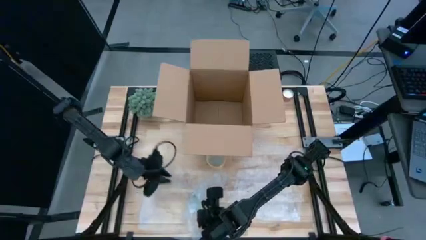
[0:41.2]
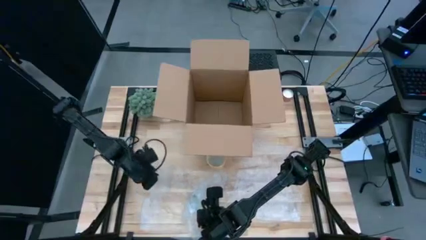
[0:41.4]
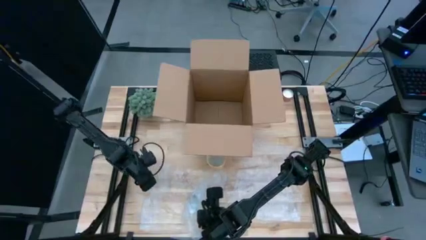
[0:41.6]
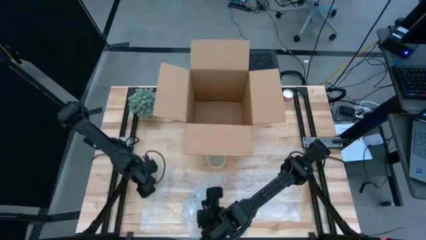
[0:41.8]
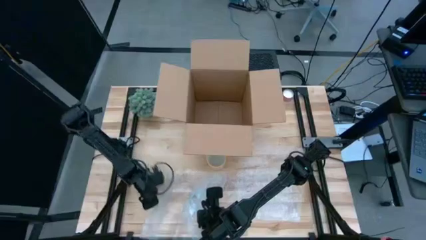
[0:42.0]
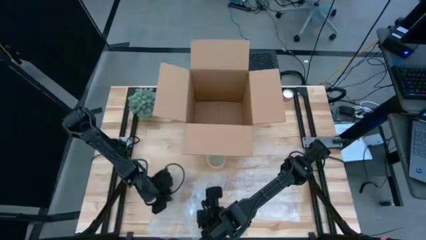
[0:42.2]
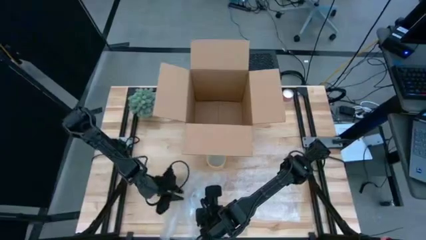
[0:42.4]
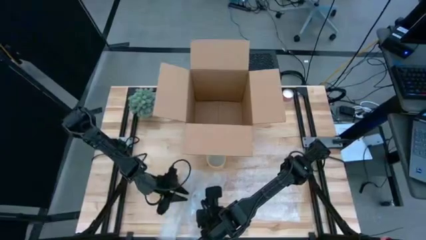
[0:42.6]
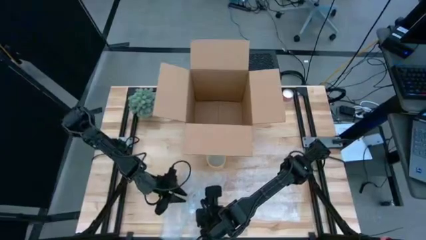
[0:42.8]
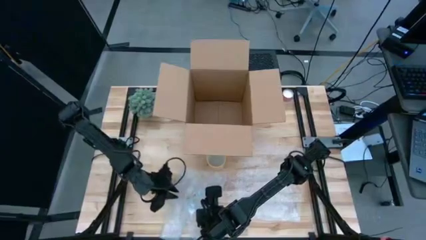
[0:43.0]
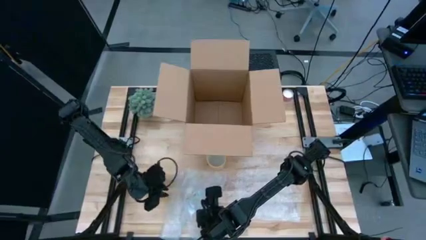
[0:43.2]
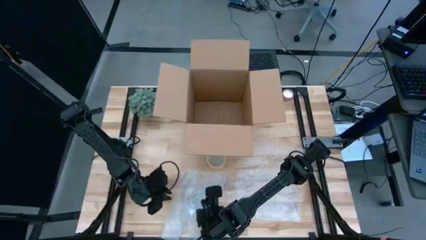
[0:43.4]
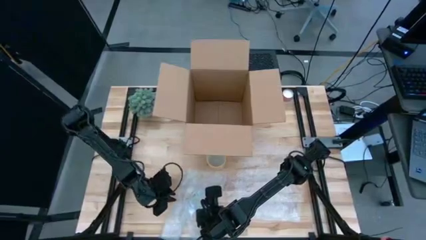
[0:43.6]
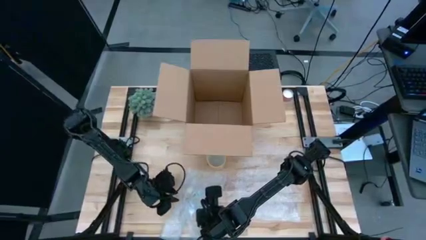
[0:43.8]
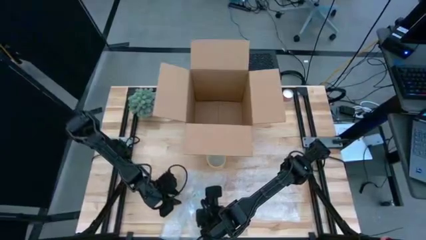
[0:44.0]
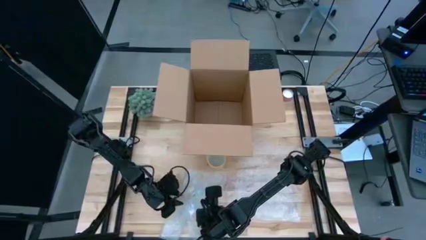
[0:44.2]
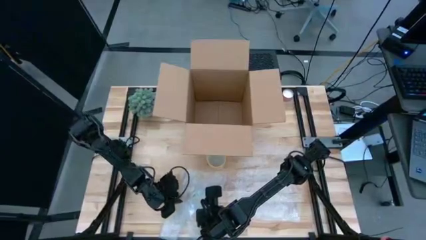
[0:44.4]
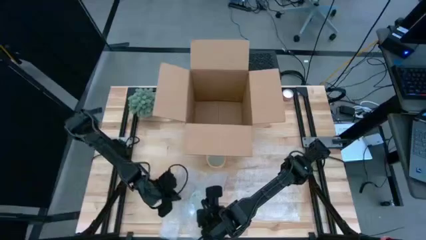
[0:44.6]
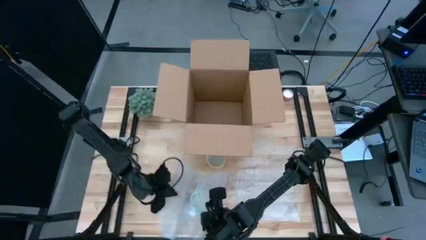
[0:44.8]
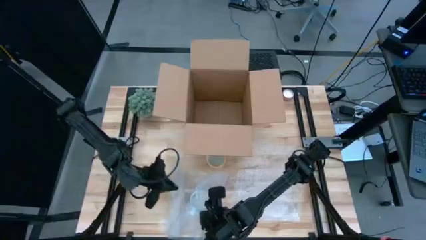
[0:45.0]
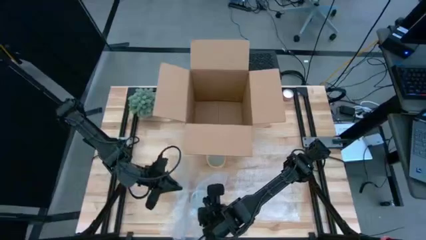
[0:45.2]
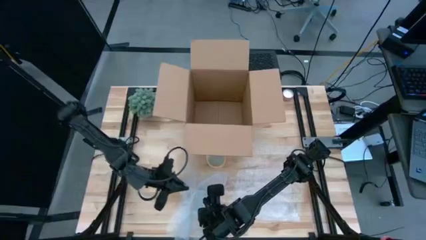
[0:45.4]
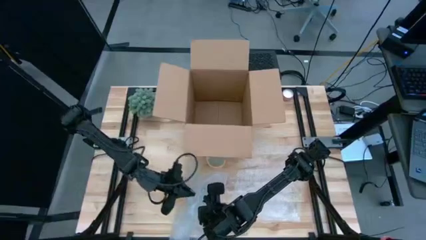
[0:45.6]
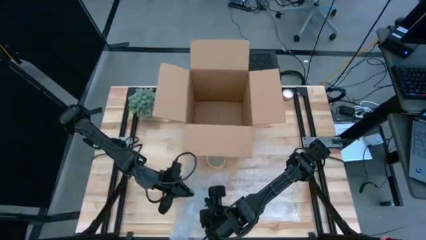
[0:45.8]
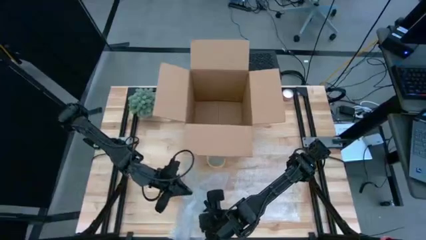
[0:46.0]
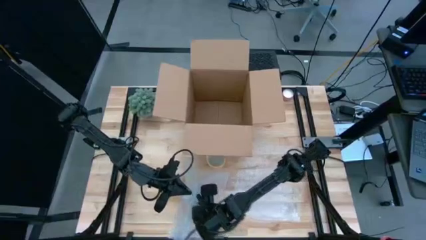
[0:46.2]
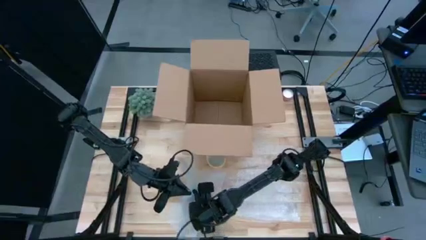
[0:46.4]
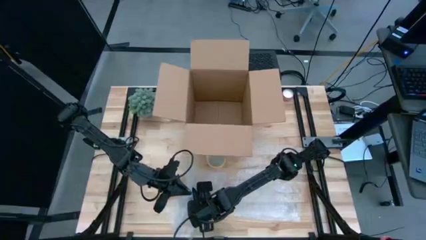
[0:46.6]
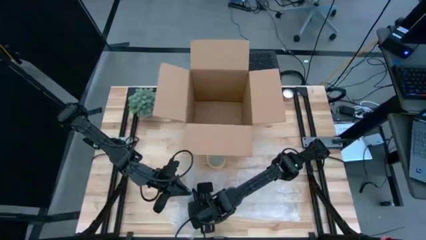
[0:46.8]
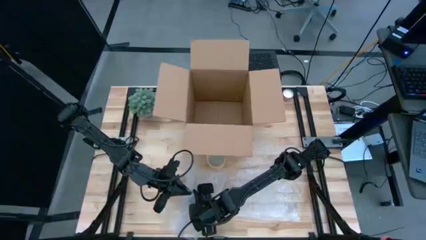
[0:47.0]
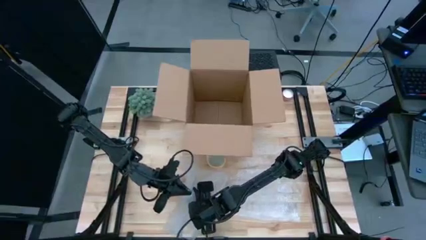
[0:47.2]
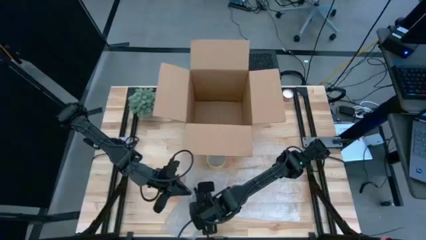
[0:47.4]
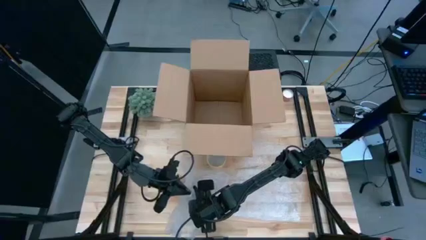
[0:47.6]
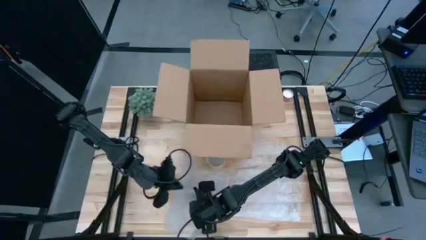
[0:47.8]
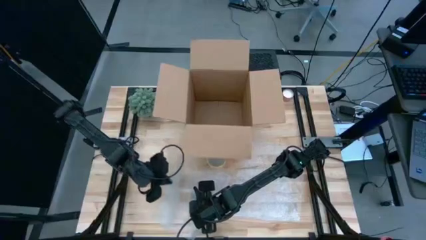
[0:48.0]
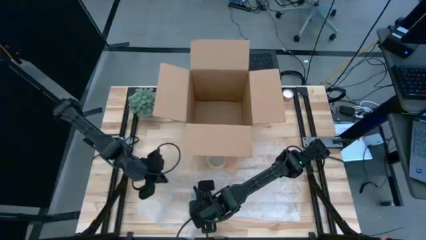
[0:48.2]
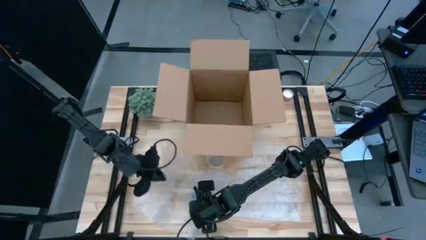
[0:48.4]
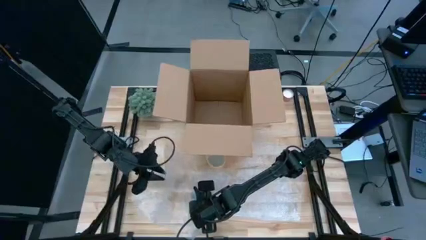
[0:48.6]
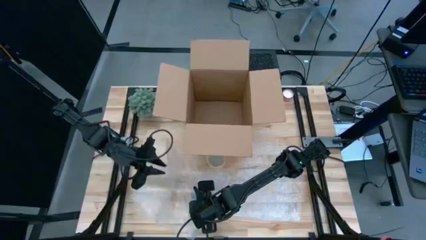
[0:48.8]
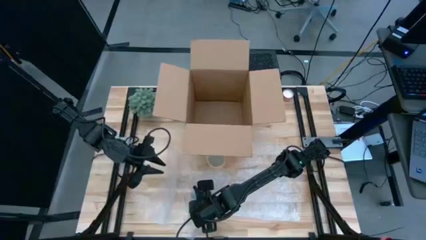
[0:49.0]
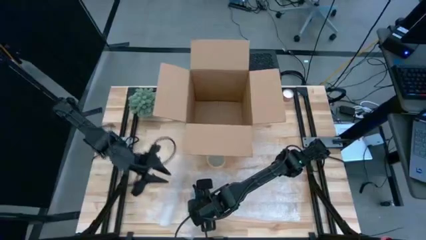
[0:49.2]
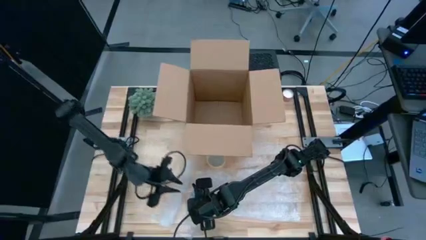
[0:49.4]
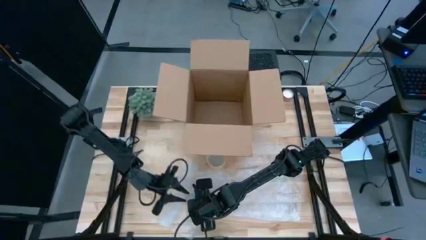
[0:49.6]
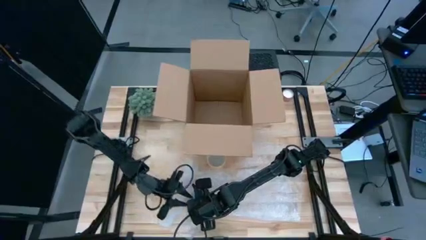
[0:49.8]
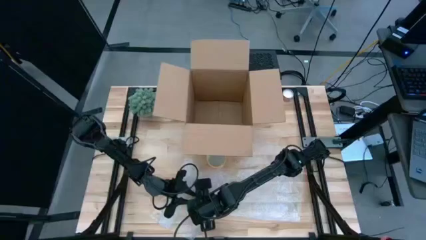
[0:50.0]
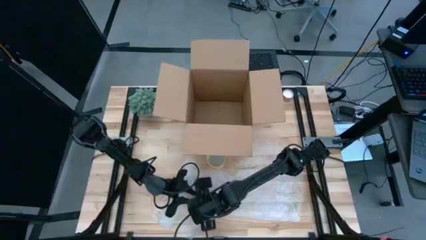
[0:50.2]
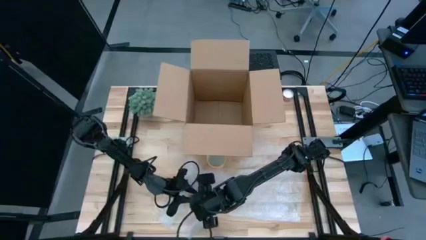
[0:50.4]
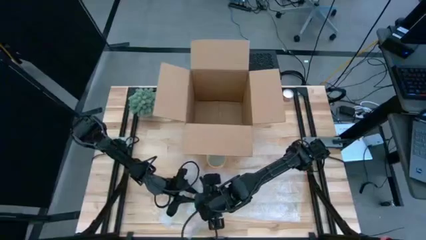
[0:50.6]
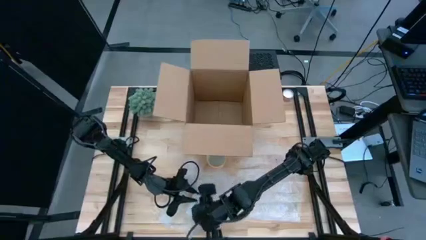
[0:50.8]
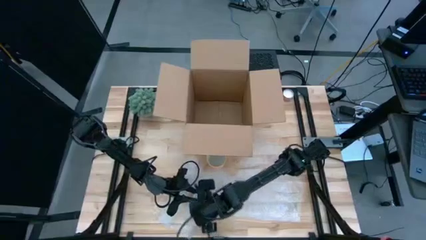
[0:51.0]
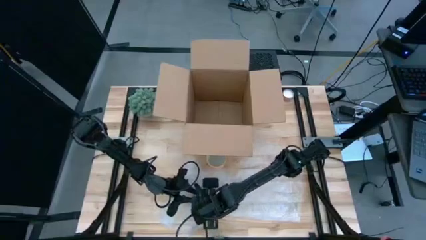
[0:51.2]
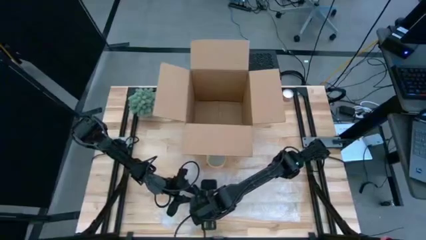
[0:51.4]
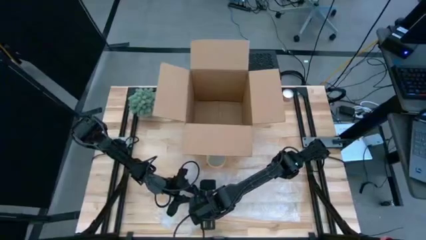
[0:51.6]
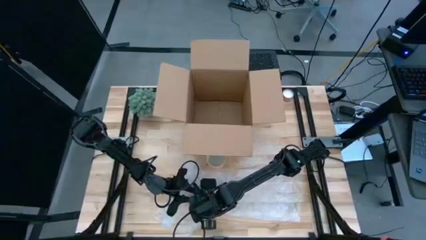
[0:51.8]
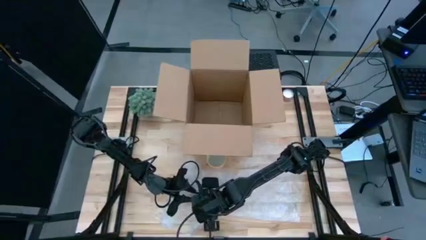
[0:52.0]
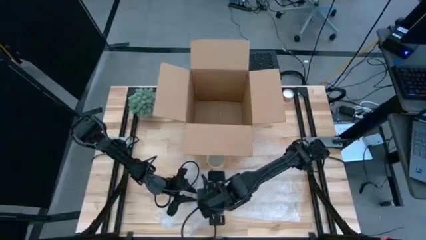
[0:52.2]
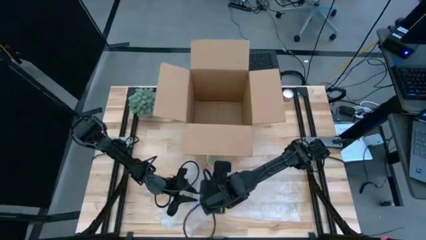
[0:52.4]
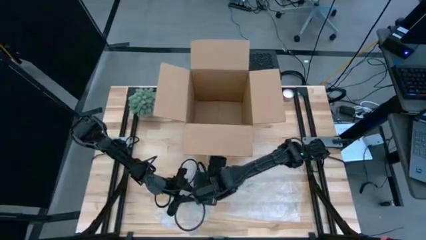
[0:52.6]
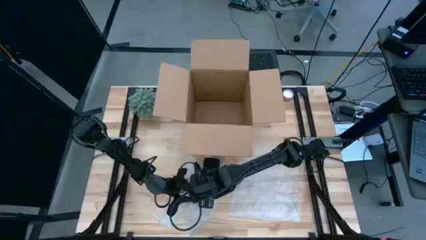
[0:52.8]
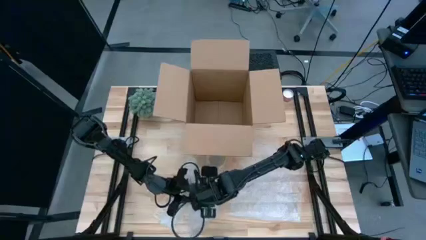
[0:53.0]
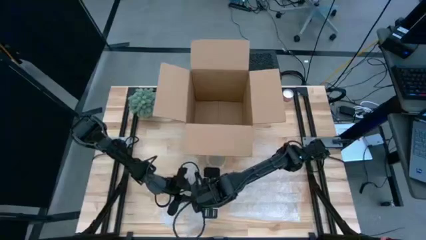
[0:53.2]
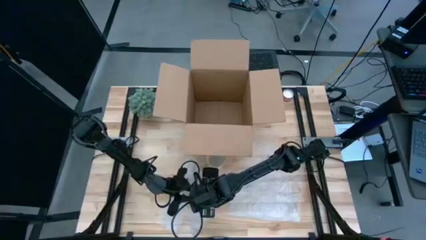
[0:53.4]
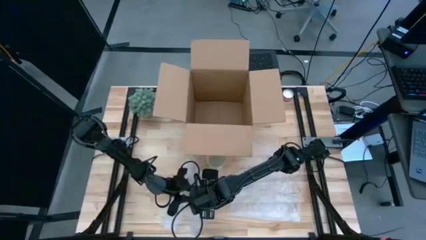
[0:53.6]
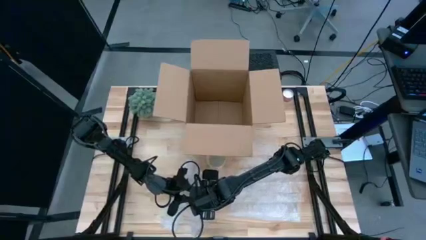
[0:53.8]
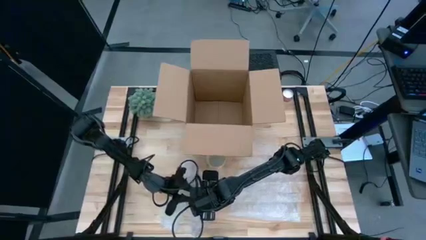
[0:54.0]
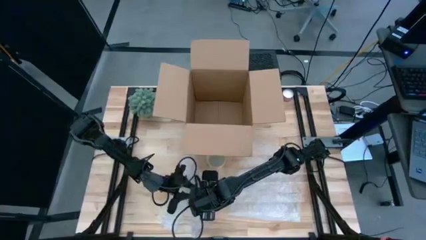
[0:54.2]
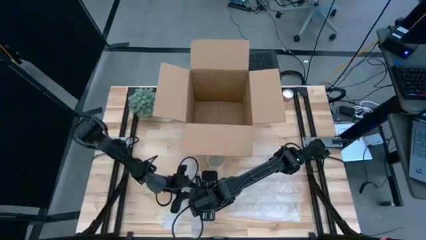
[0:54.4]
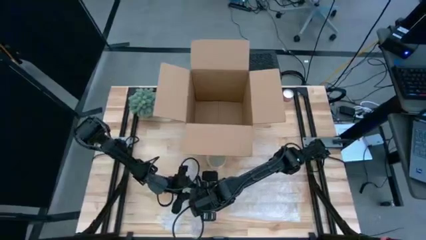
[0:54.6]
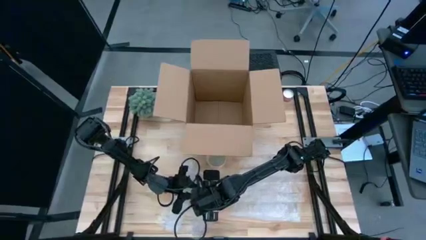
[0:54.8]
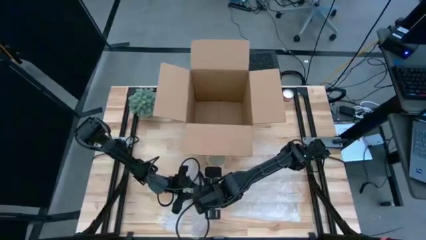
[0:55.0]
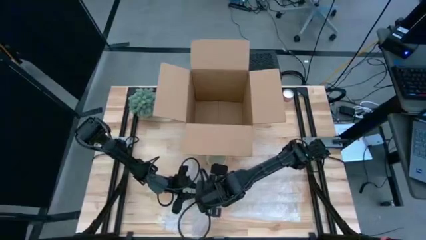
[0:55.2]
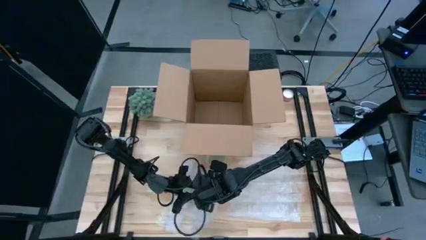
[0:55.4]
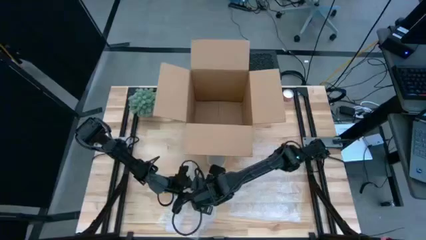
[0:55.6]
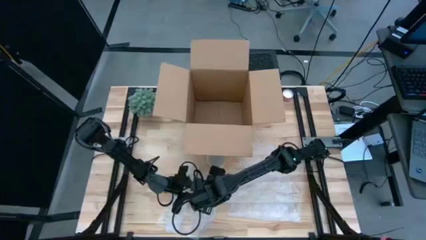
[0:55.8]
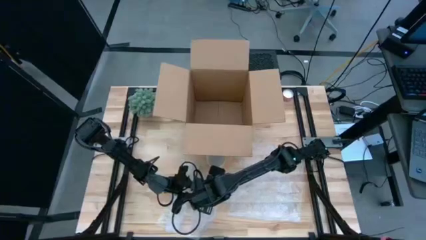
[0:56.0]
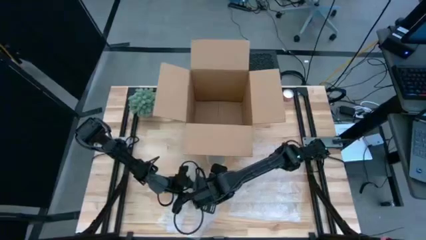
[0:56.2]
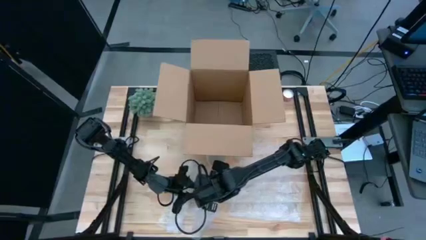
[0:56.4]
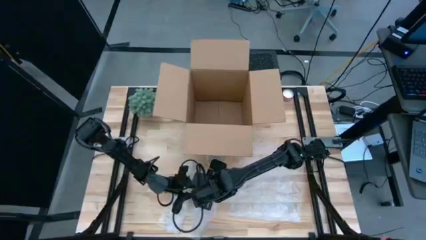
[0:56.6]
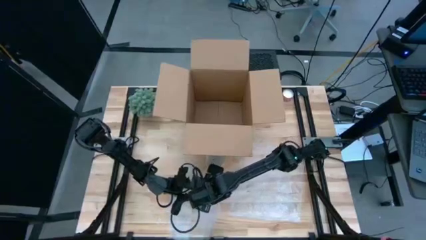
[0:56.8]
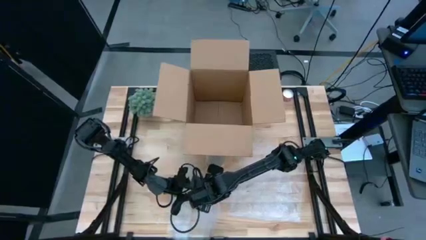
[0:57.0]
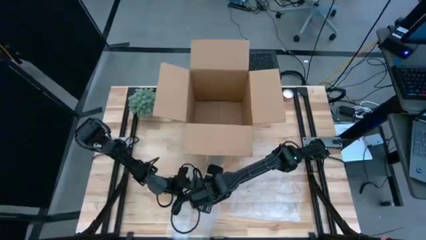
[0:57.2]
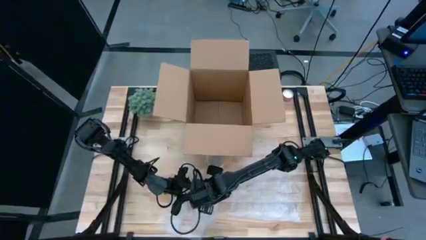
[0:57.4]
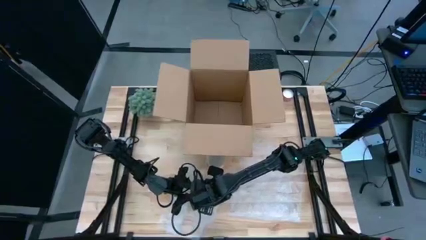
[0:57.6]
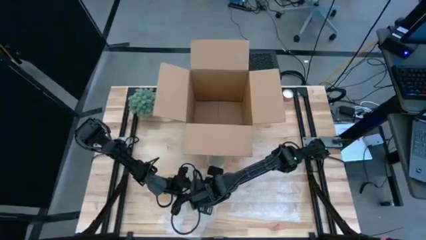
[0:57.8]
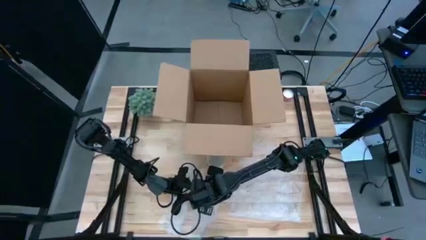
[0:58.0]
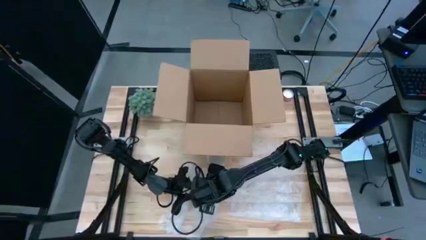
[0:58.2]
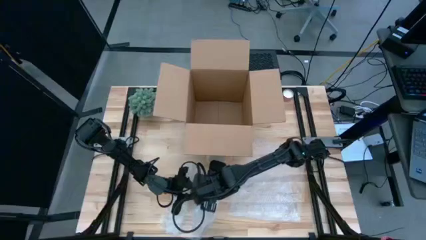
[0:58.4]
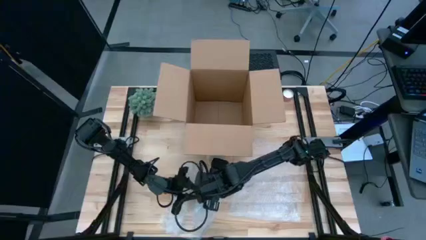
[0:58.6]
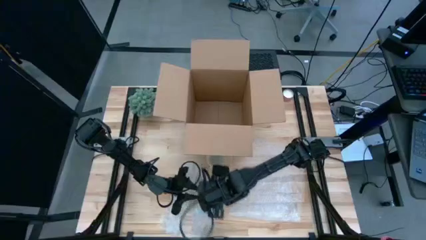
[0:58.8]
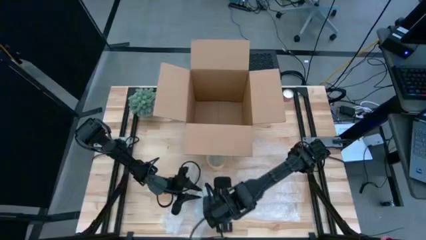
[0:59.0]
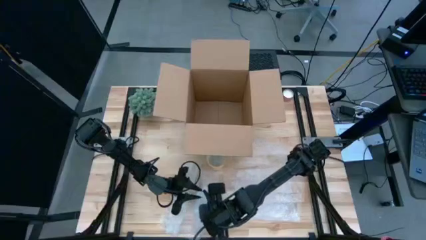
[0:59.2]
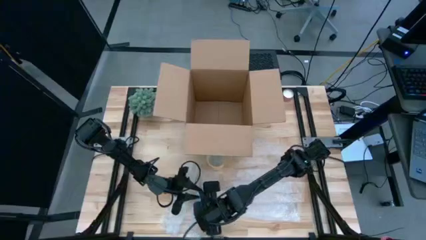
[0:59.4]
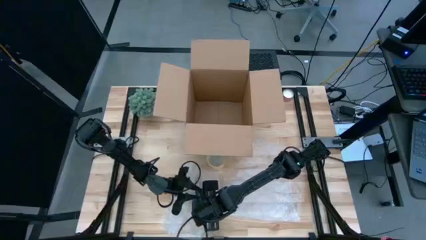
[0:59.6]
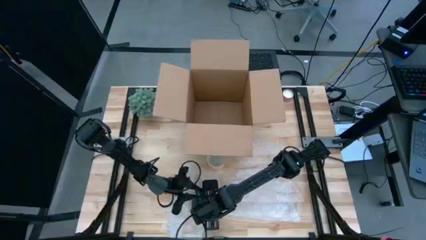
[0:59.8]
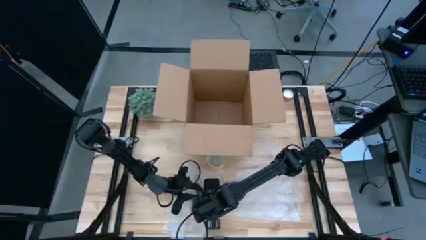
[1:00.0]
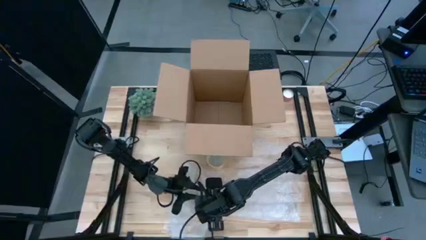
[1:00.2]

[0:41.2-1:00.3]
Task: wrap mug
Wrap the red patterned mug with bubble wrap
